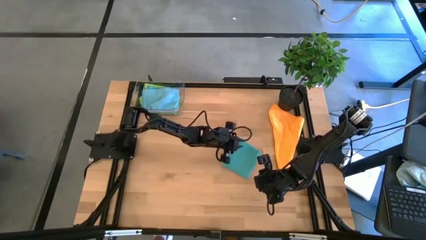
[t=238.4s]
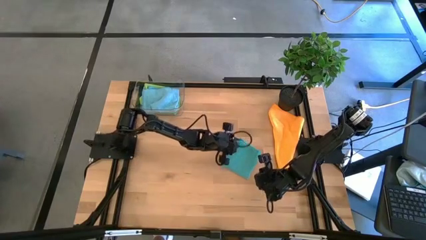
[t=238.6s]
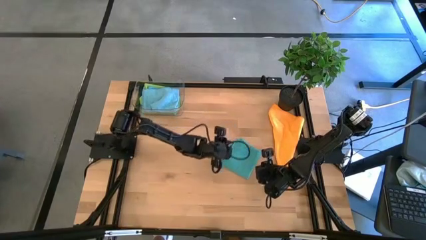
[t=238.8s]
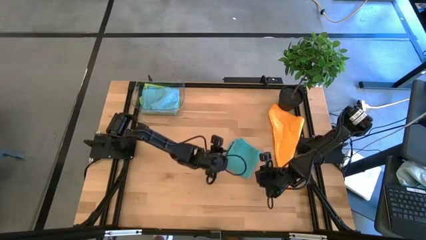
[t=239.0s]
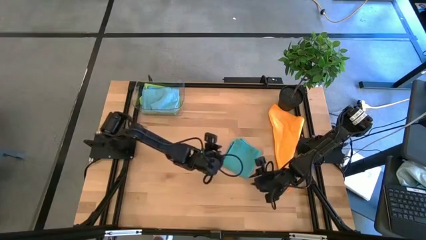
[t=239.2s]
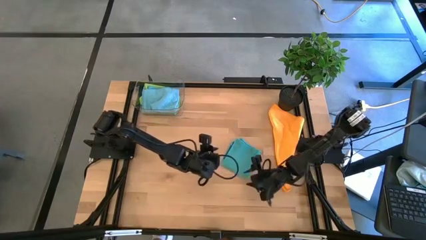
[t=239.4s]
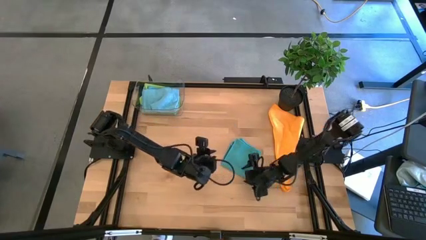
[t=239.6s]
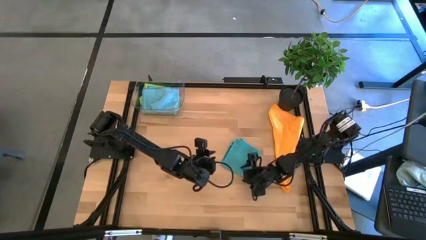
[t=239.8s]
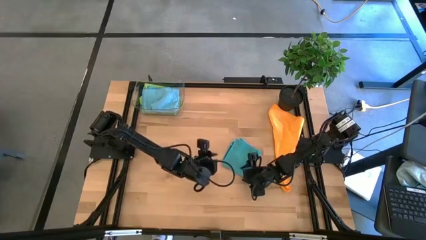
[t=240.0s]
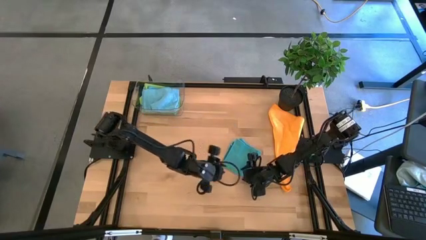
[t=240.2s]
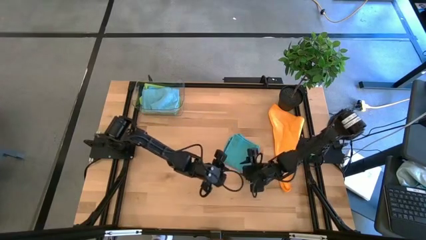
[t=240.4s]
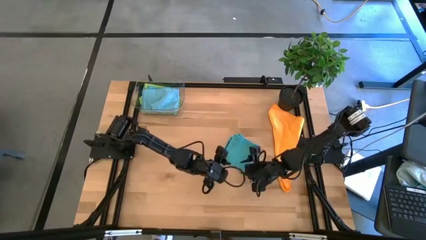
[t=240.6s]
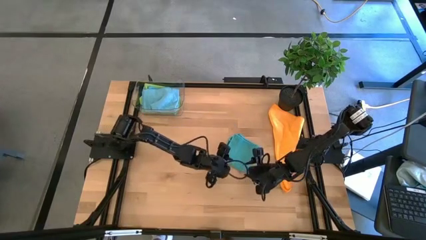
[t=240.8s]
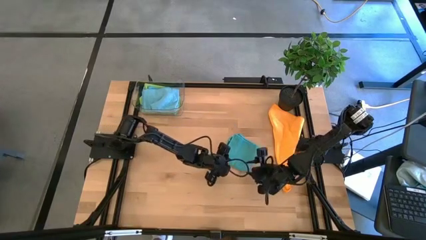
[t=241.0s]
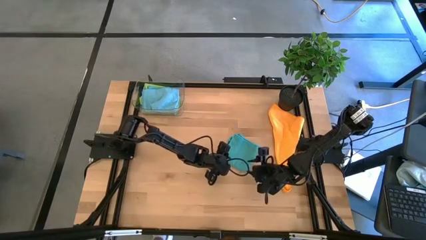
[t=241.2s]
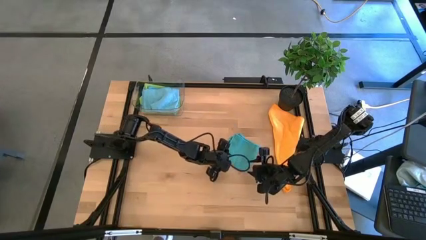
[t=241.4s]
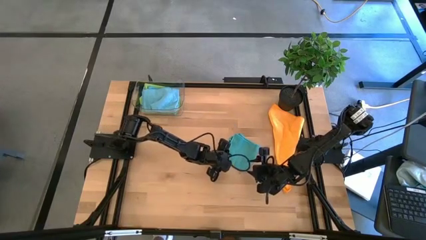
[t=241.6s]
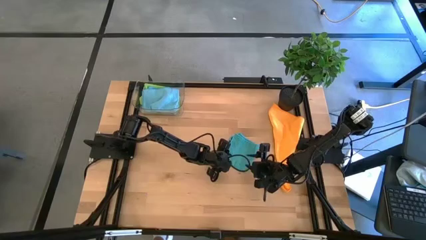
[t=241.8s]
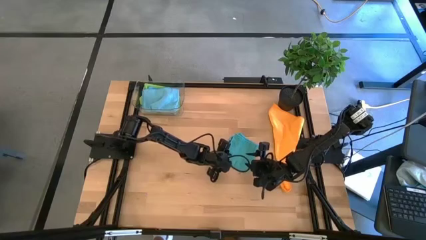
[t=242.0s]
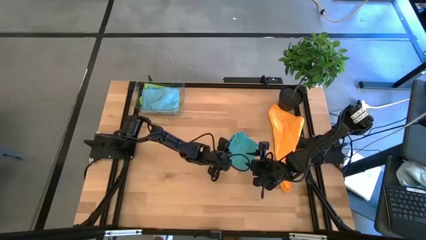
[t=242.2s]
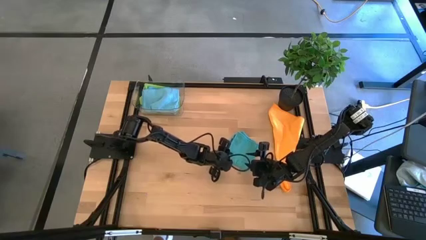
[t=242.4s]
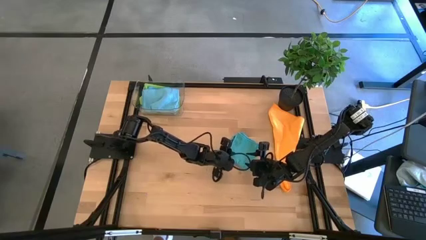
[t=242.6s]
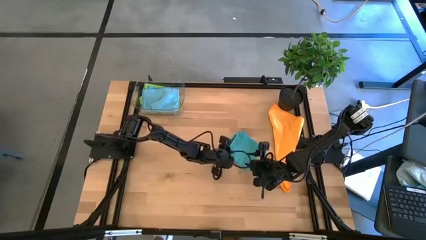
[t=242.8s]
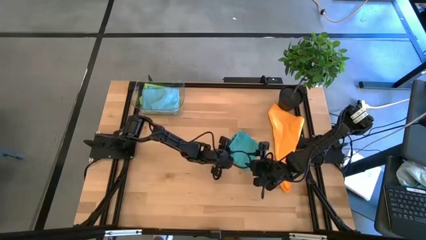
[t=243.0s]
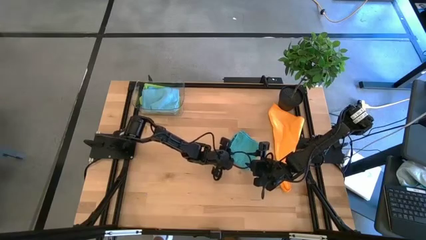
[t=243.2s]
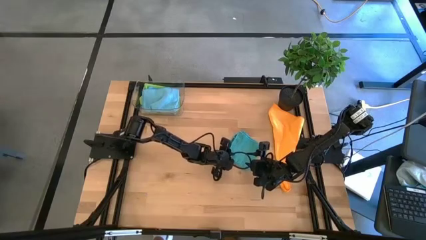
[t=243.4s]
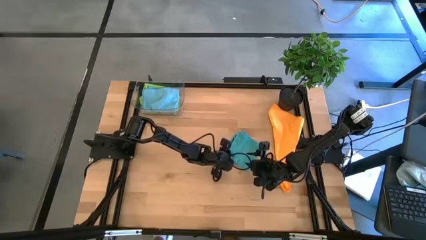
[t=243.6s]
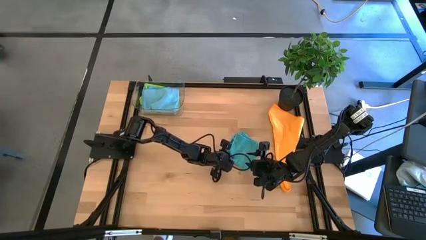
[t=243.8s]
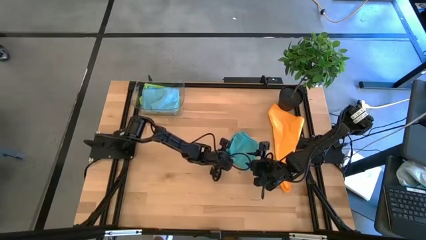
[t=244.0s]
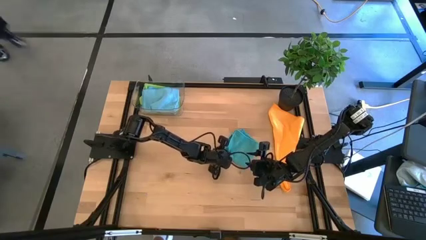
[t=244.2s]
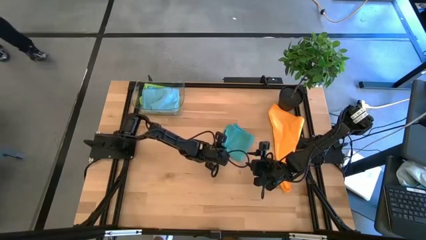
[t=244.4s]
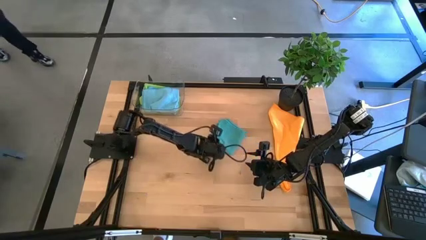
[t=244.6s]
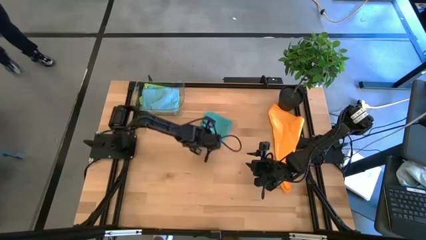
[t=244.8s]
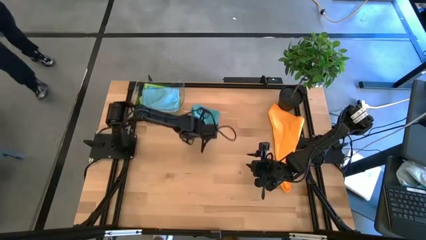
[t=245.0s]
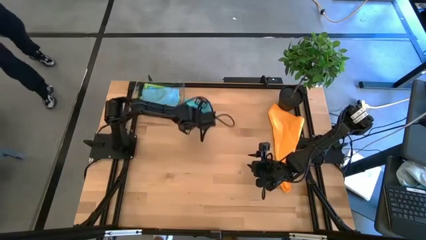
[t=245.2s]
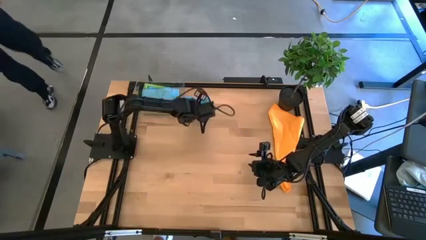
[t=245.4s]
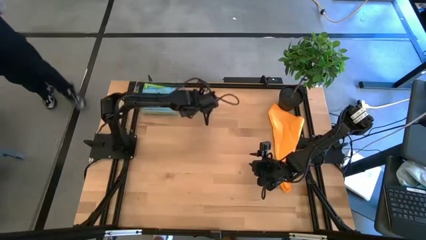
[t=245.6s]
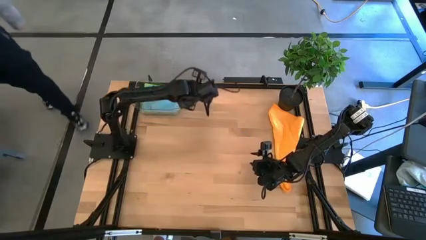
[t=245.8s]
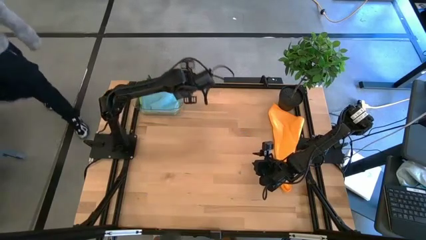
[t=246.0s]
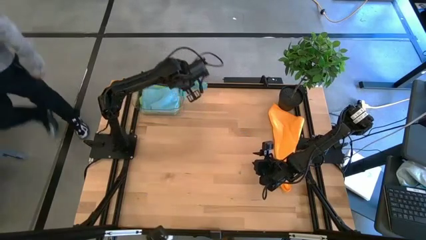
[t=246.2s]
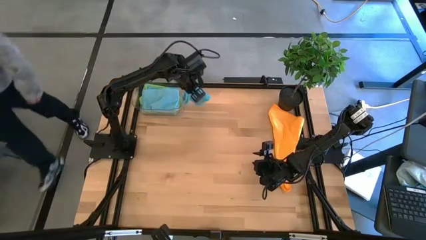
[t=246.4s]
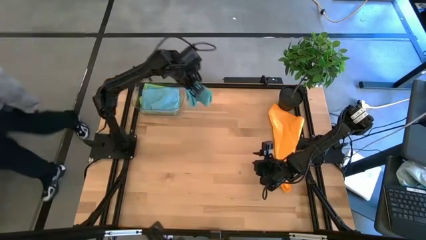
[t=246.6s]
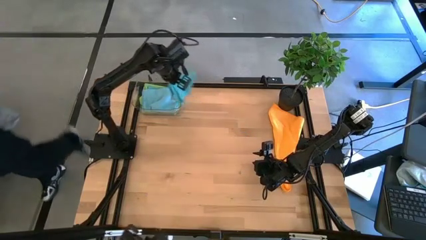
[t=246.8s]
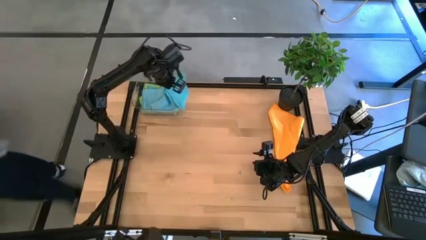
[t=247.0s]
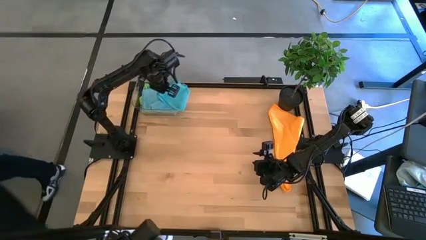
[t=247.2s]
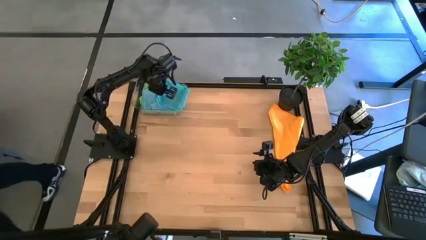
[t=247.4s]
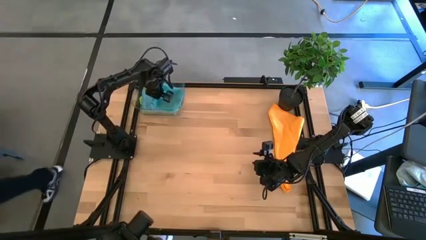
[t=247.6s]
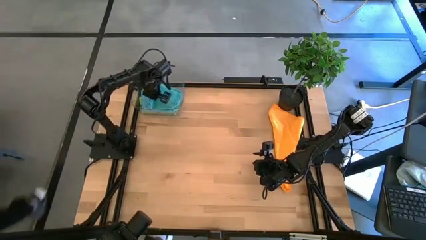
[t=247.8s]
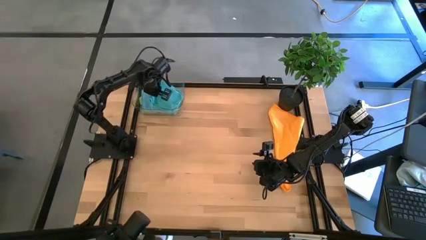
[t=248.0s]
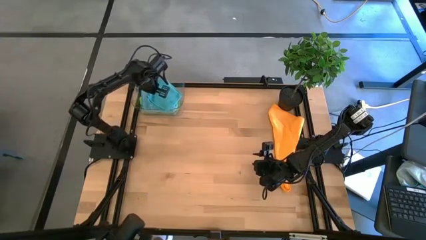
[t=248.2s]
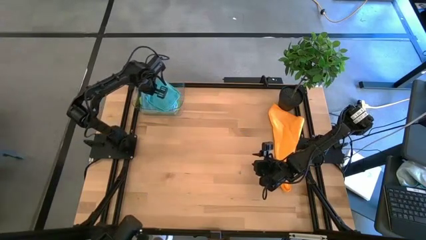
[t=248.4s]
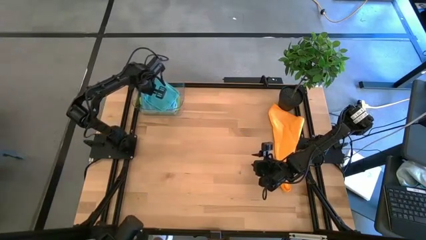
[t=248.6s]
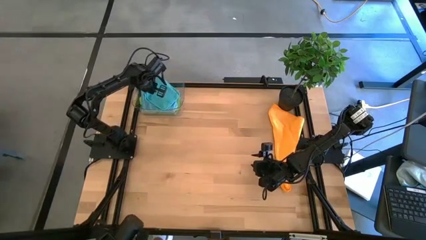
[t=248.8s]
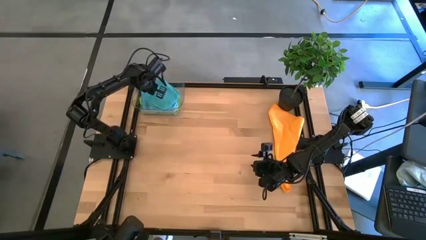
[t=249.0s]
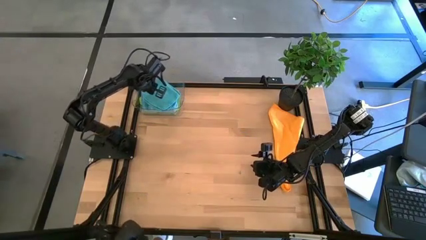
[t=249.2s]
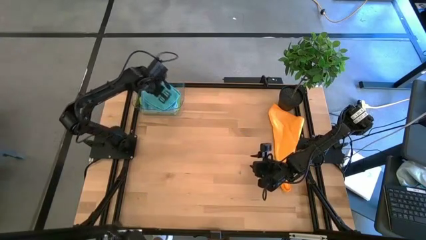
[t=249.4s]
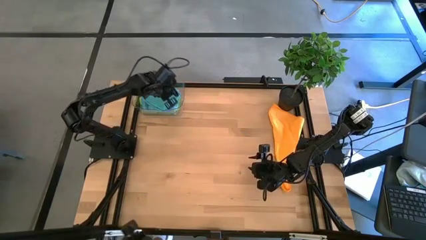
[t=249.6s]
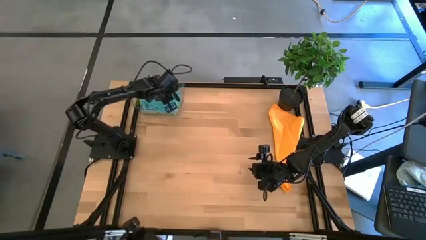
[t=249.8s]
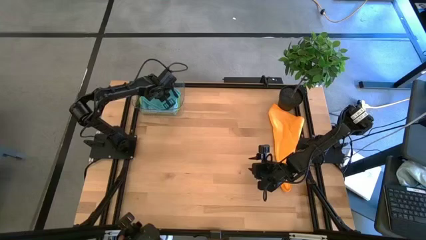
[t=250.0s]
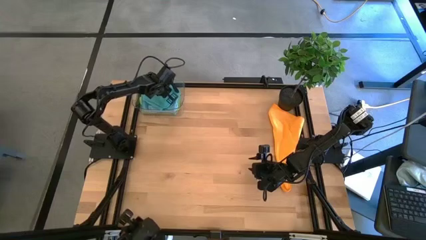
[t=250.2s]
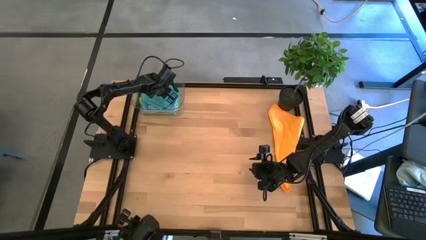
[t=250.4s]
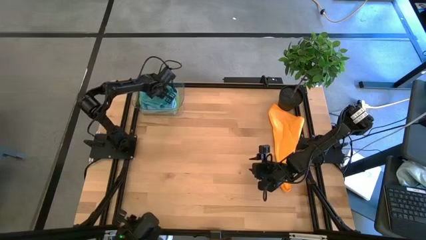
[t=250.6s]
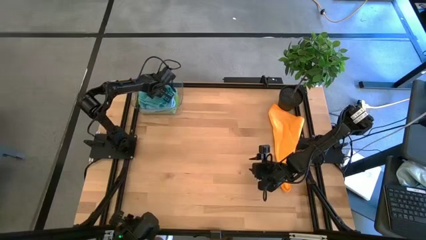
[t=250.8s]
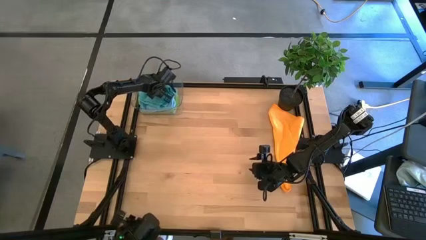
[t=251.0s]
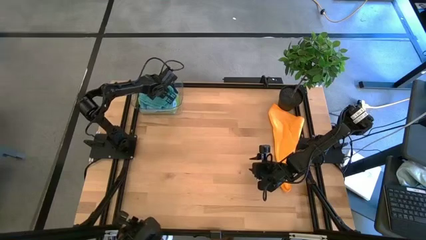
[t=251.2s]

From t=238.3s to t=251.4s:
Task: Fold microfiber towels
Stack the blue microfiber cloth on top of the light blue microfiber cloth in the transparent bin
